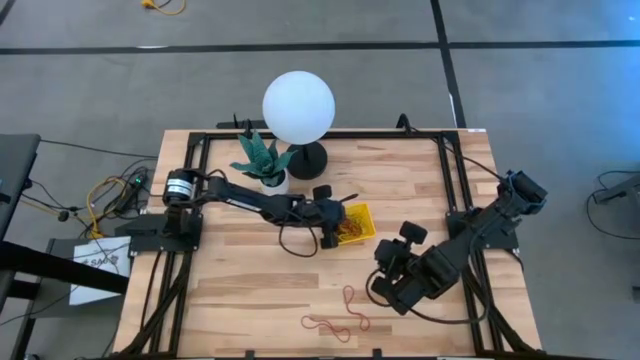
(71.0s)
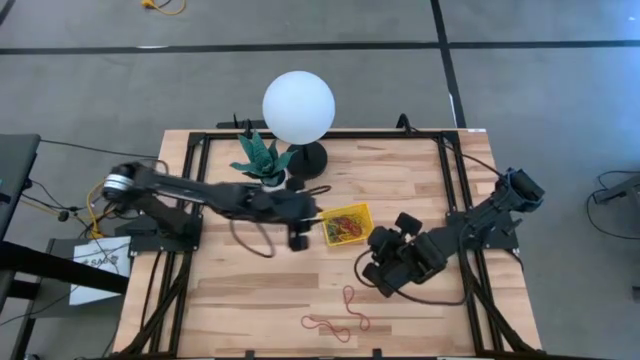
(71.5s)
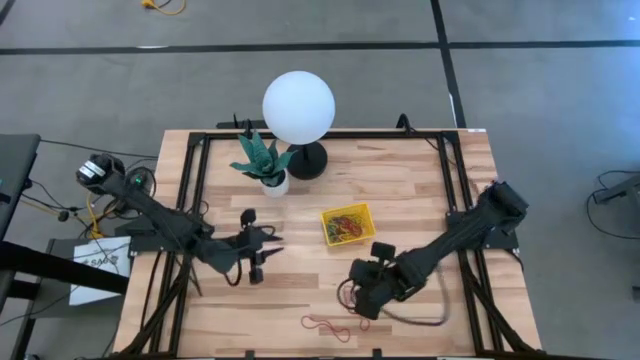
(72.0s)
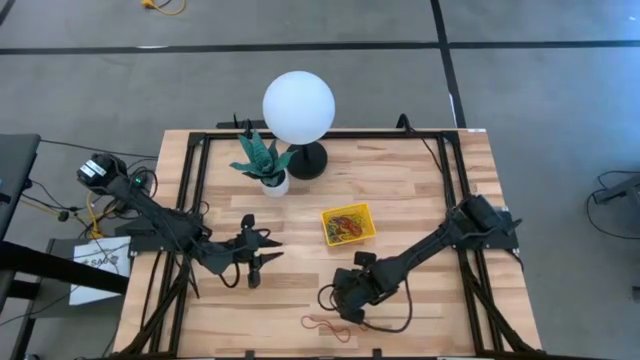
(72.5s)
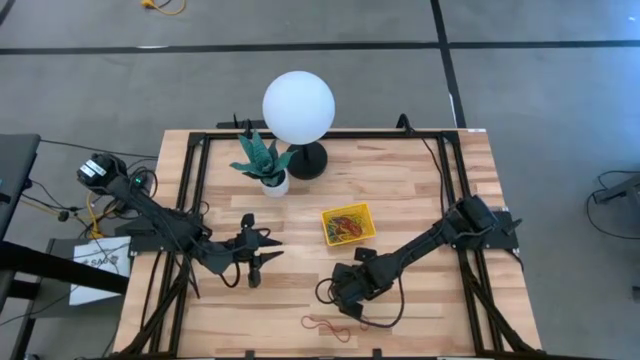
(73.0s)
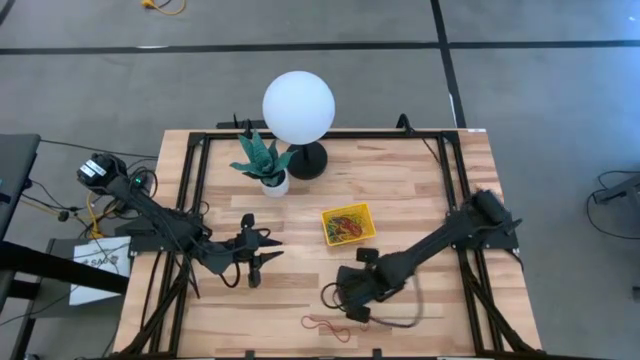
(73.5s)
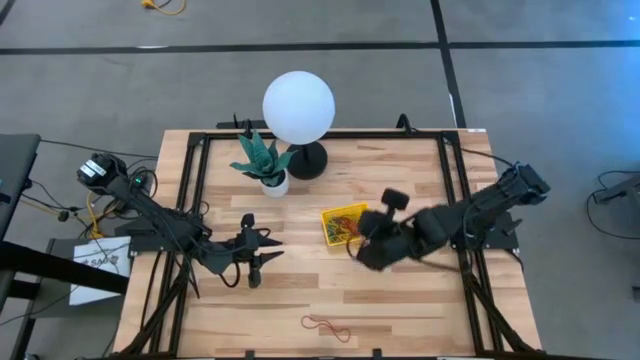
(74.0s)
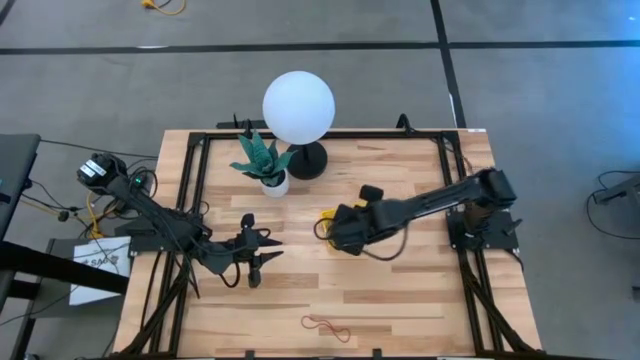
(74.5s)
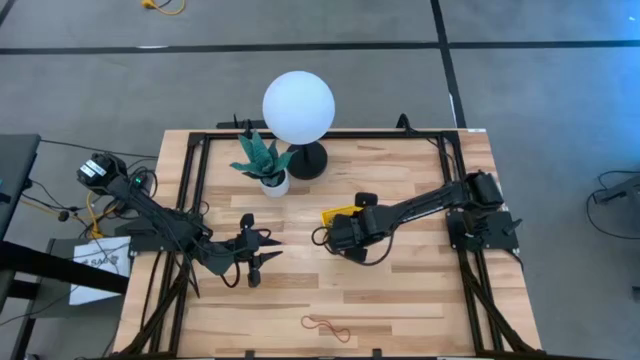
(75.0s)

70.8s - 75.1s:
Task: Pick and place items into bin
Put the red rubber band into the yellow bin

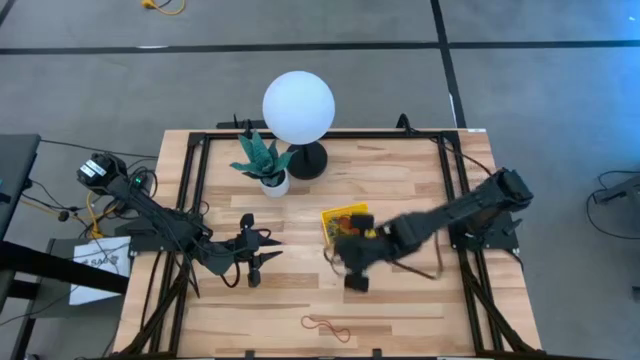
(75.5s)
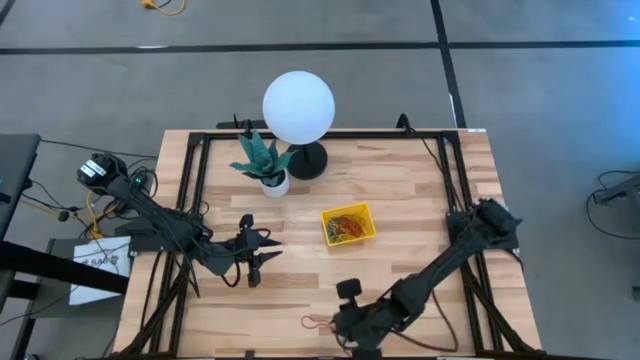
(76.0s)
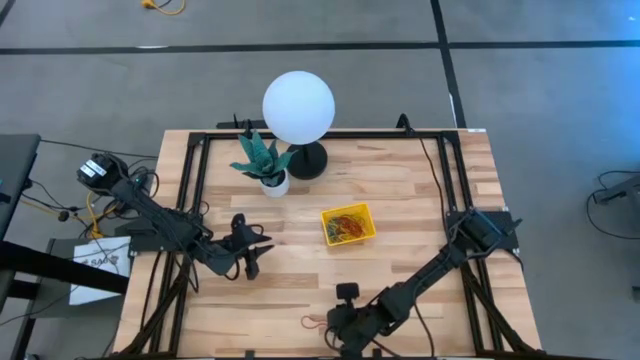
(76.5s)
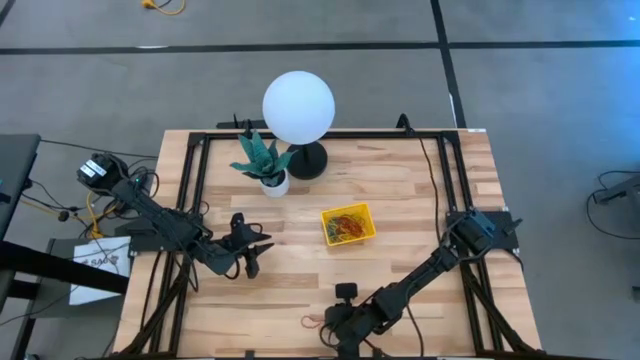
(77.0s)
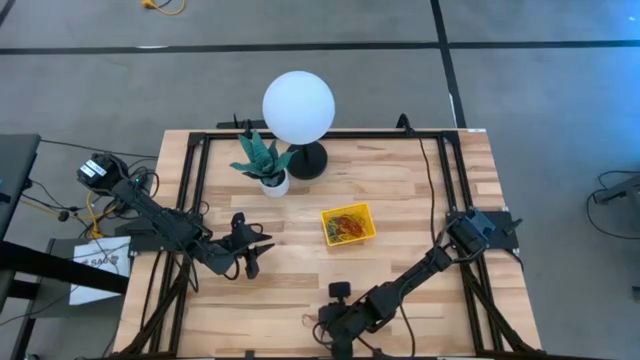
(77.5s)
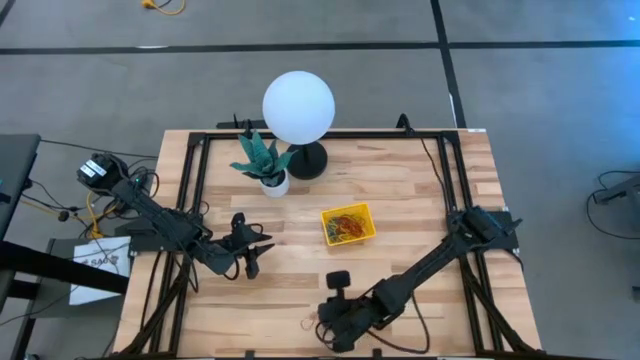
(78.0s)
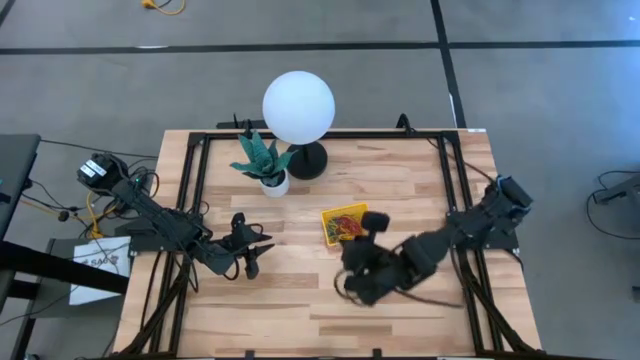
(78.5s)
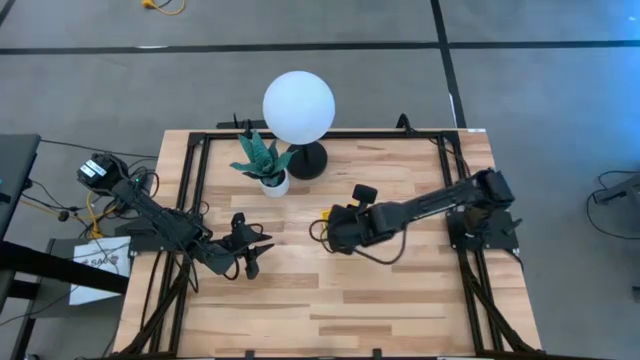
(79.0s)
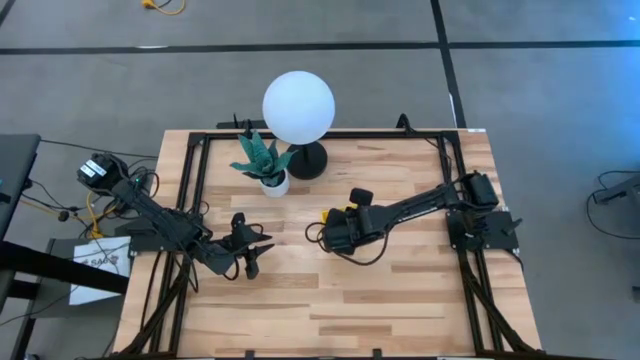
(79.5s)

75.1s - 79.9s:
Put the red rubber band into the yellow bin

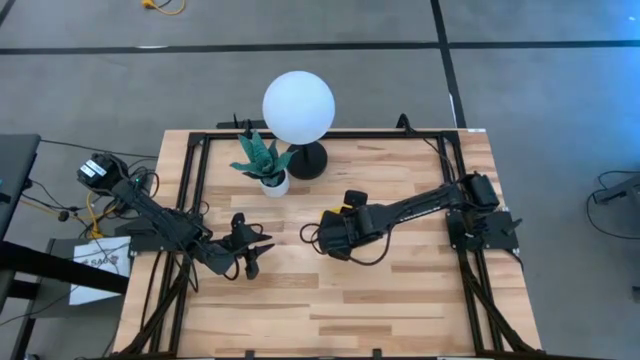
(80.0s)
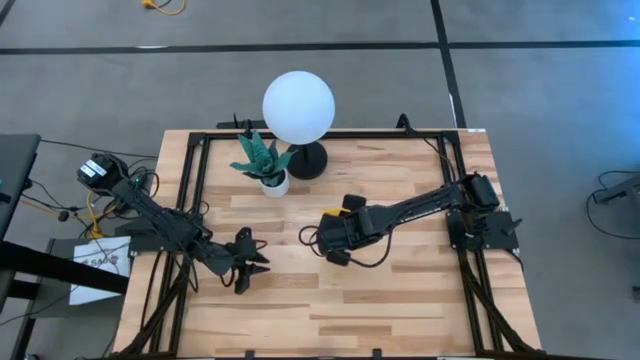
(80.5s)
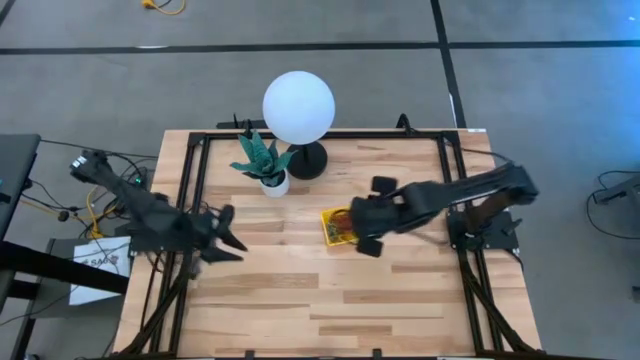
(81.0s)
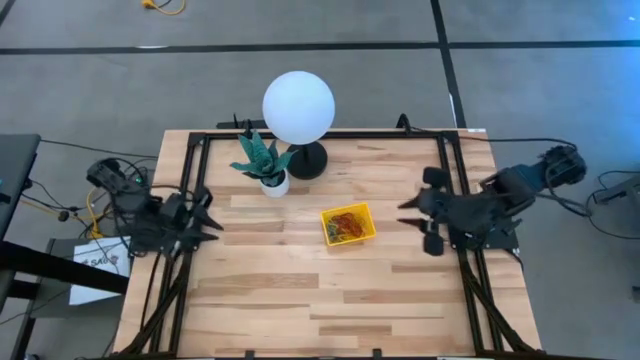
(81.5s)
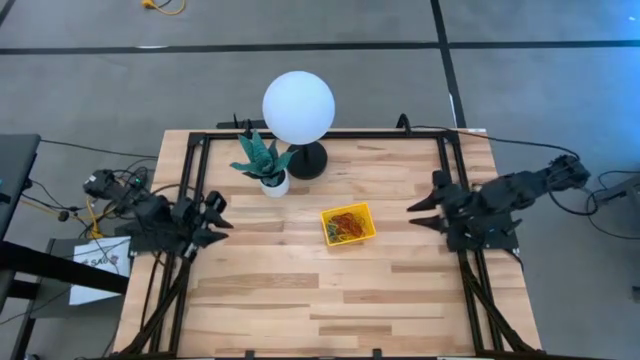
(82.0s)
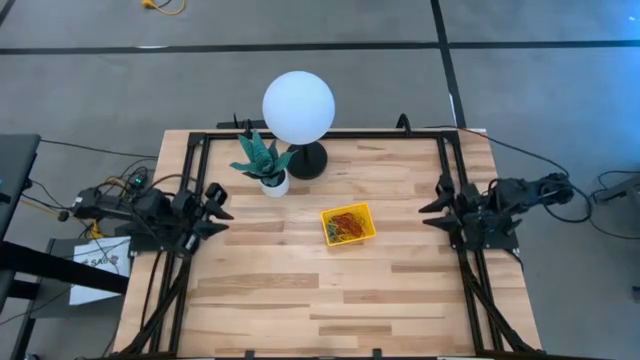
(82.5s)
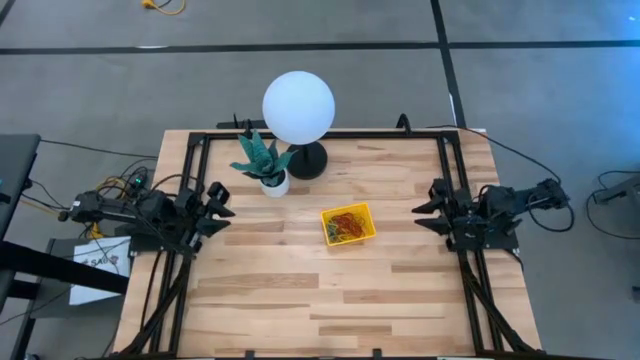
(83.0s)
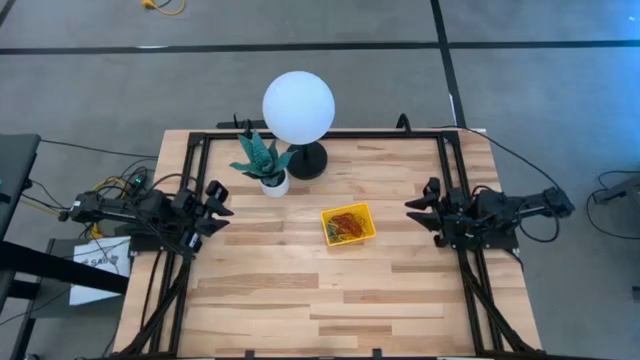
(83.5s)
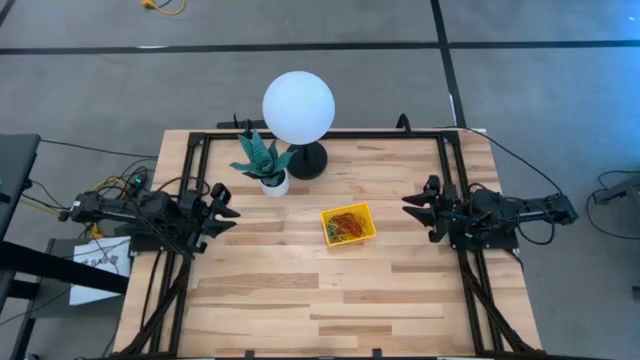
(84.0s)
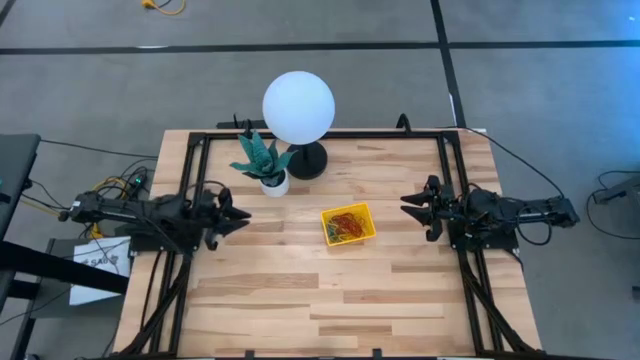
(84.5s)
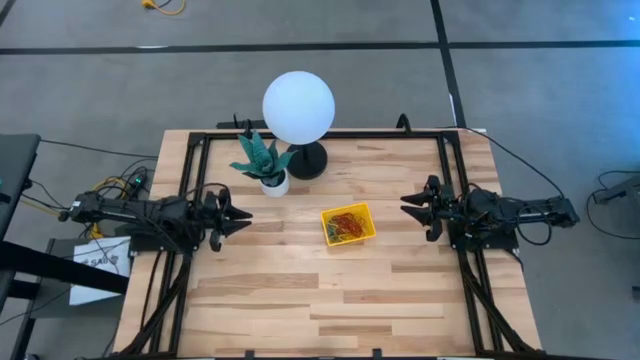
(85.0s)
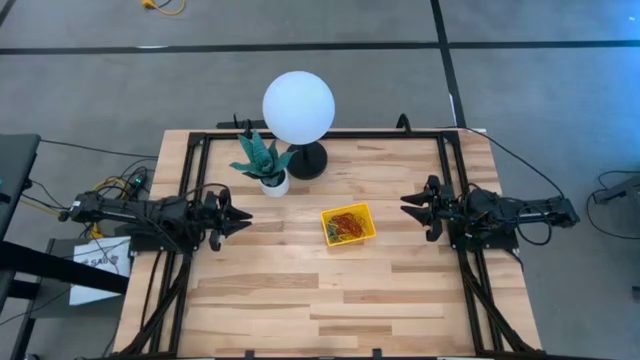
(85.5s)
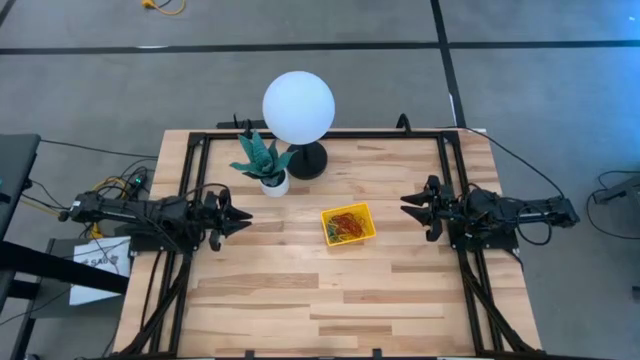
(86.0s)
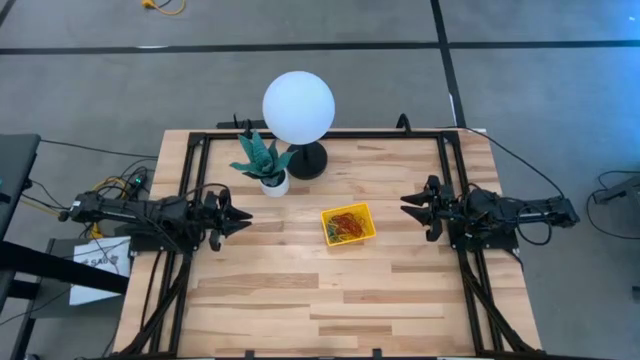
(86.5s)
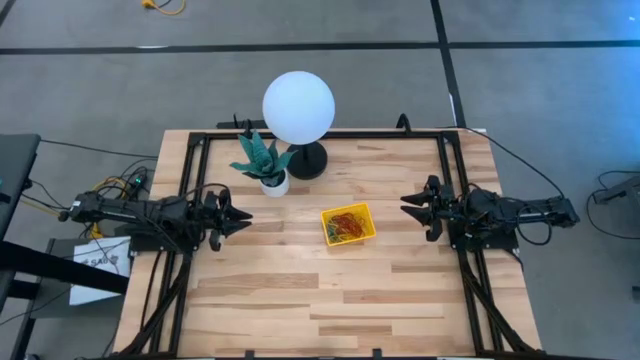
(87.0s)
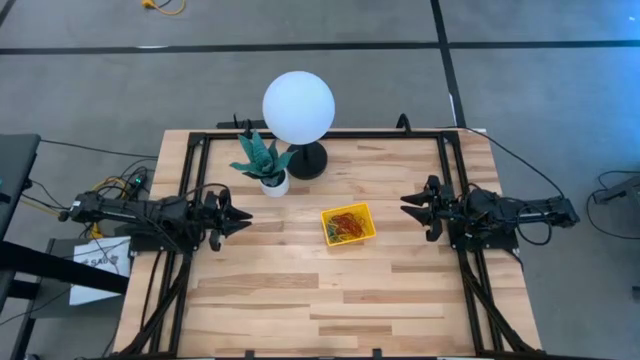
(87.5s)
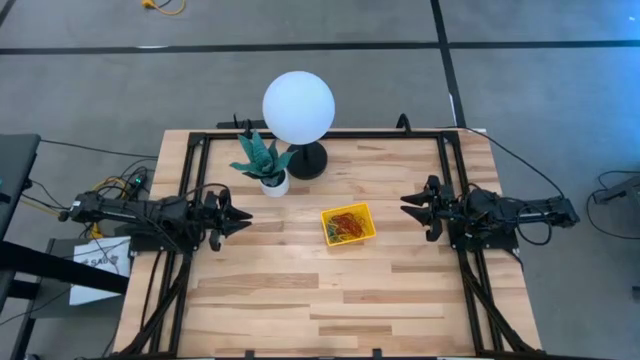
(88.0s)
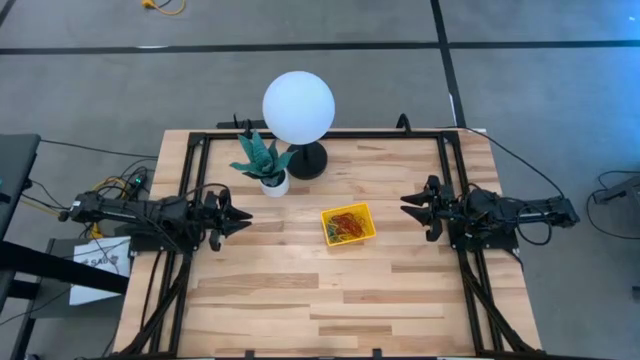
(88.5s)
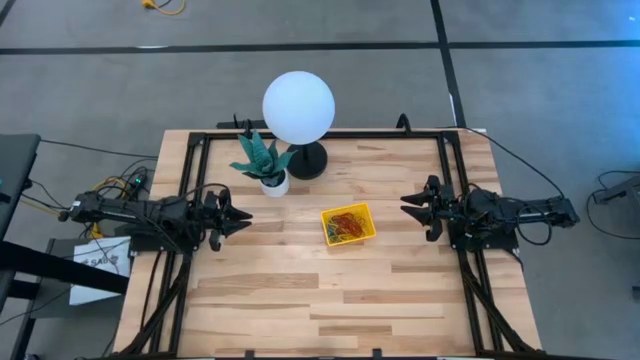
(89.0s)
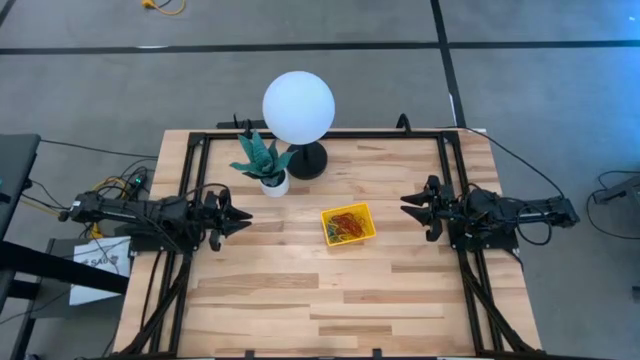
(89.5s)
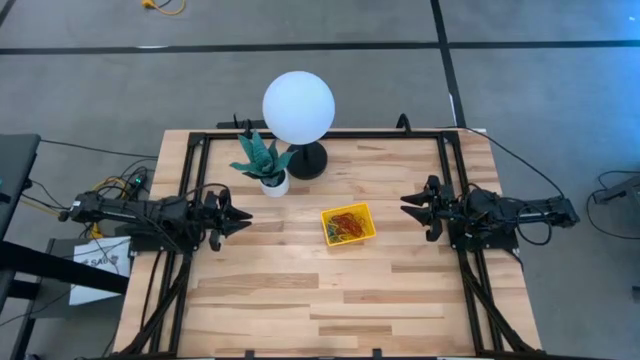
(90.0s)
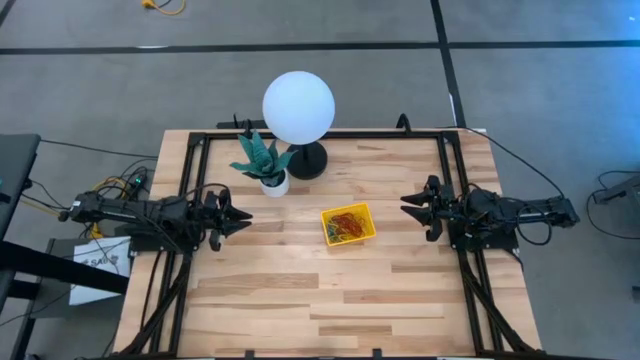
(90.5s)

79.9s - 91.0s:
Return to Home Position
